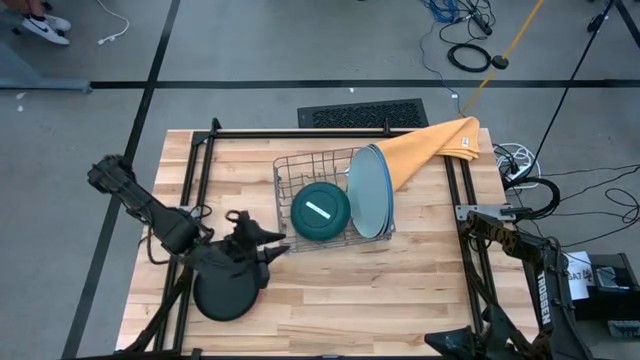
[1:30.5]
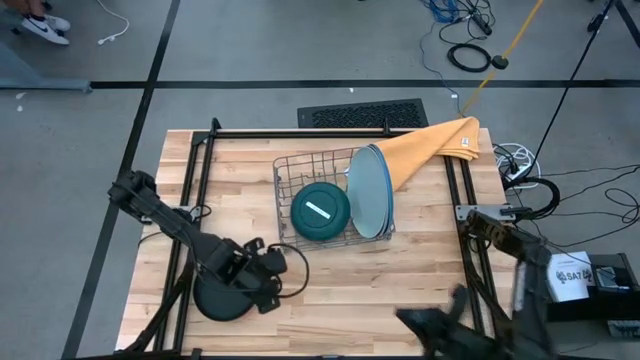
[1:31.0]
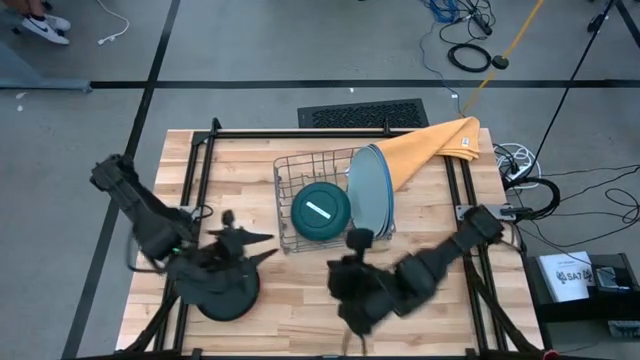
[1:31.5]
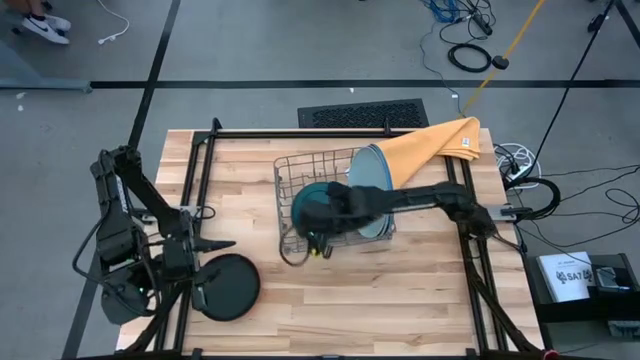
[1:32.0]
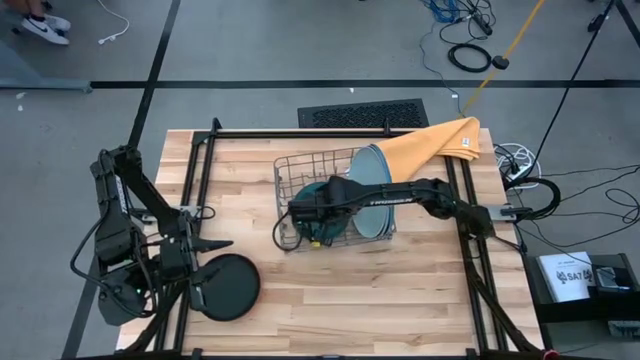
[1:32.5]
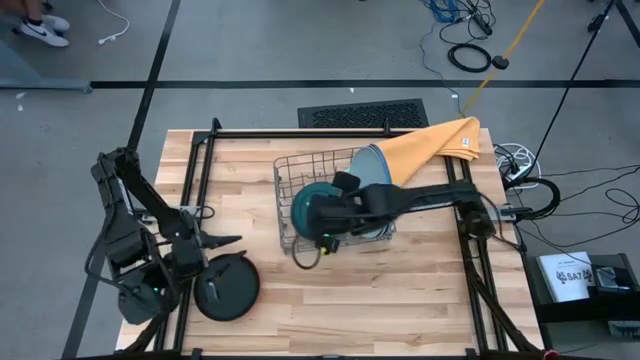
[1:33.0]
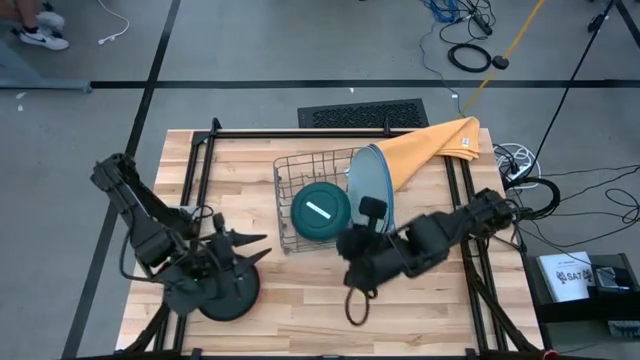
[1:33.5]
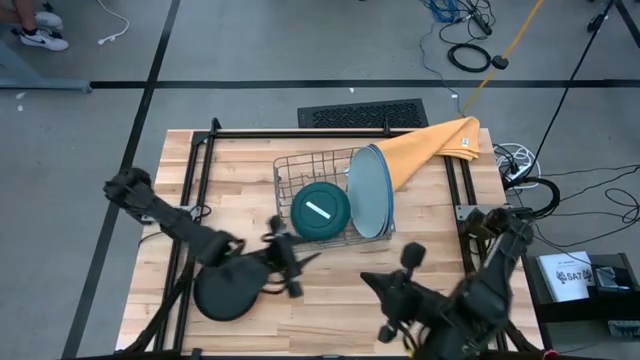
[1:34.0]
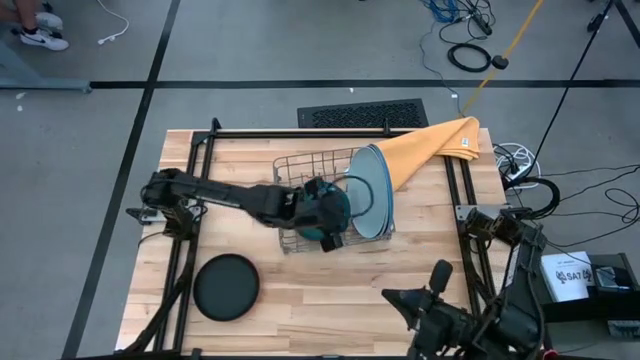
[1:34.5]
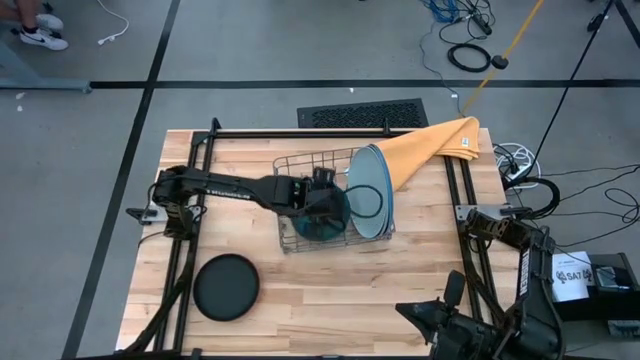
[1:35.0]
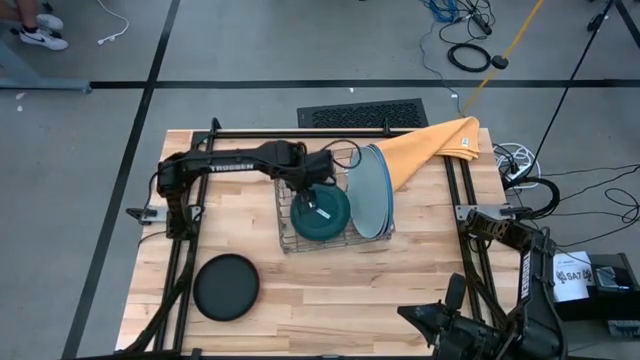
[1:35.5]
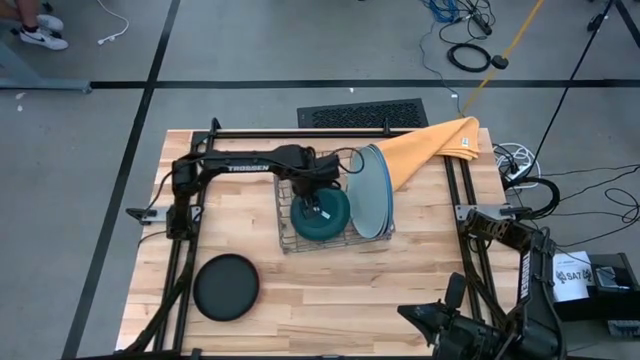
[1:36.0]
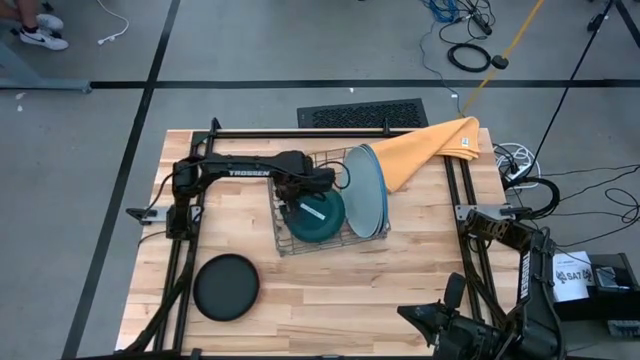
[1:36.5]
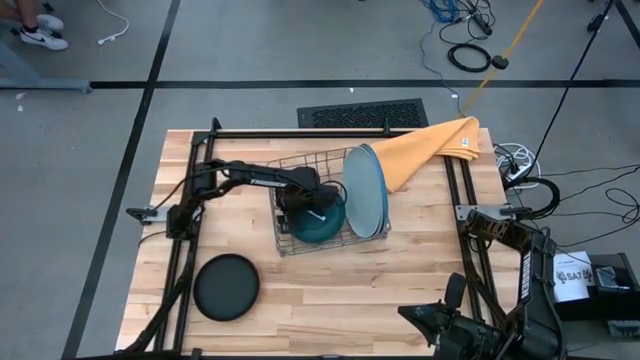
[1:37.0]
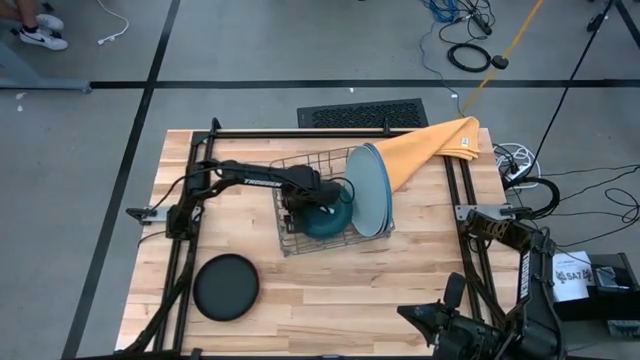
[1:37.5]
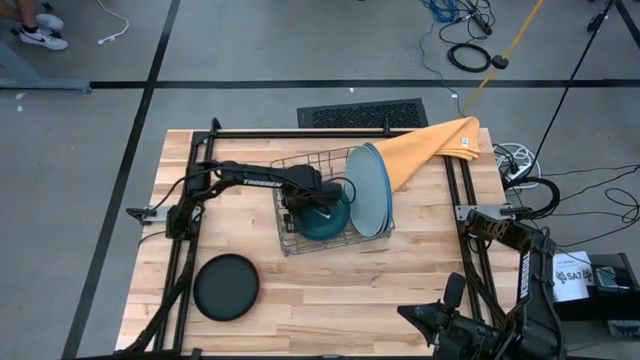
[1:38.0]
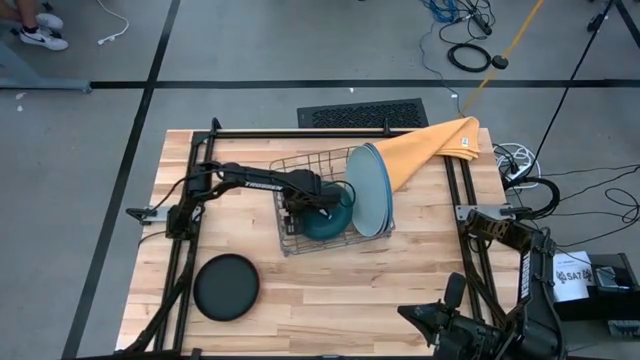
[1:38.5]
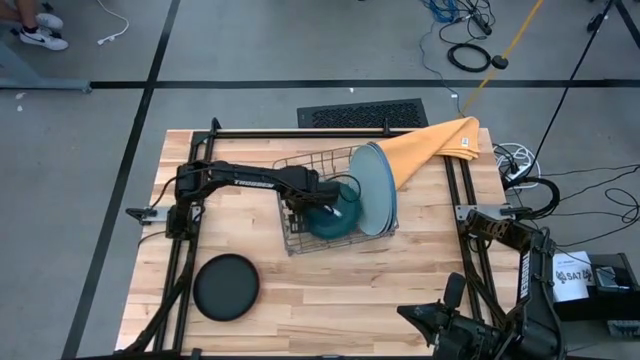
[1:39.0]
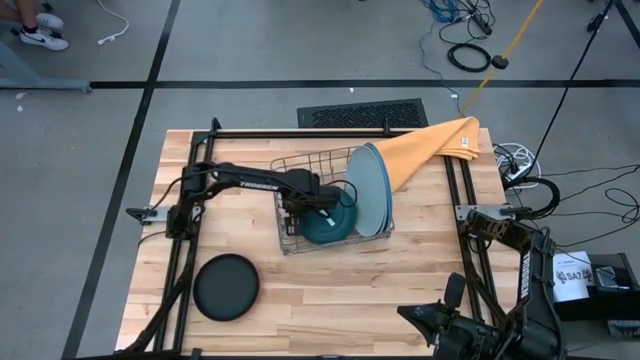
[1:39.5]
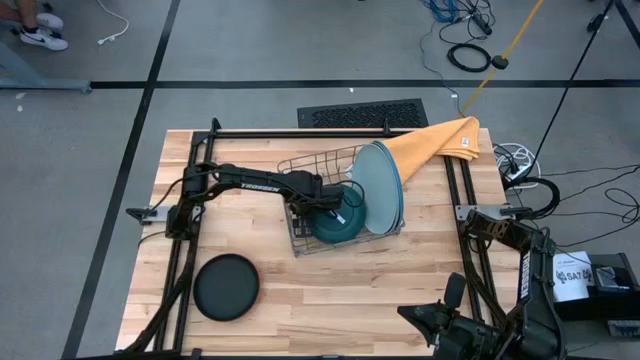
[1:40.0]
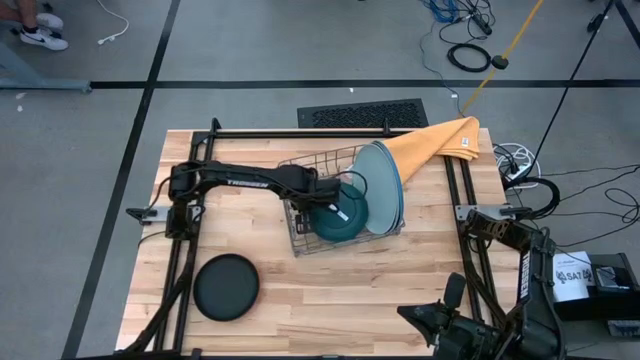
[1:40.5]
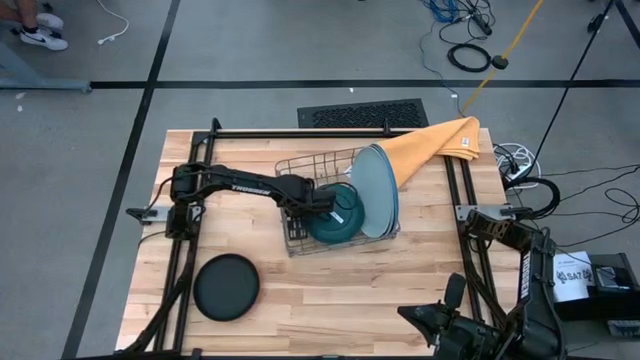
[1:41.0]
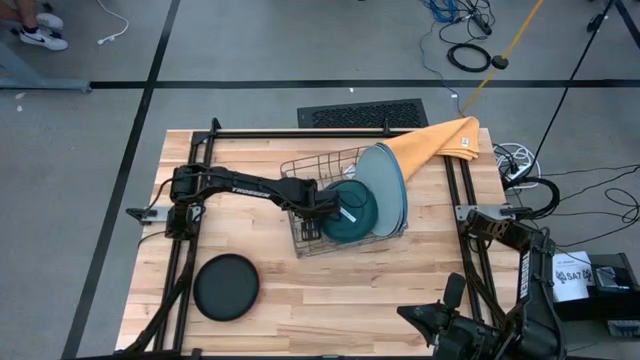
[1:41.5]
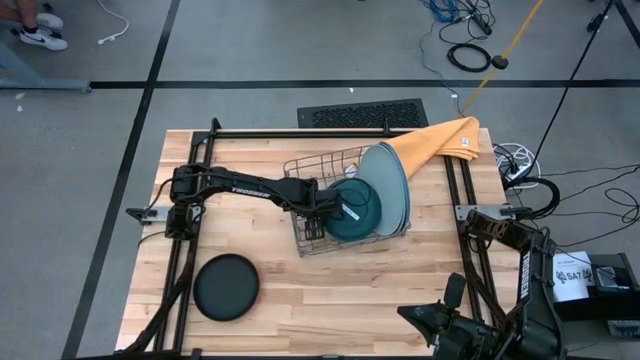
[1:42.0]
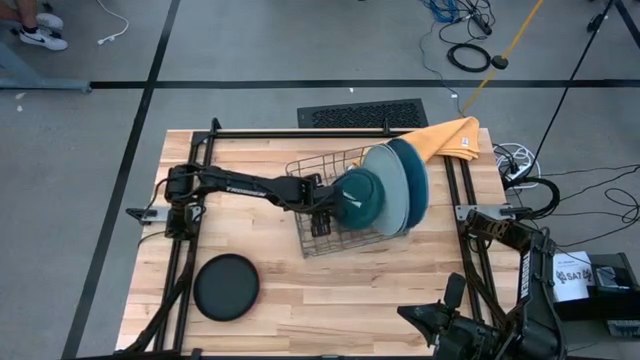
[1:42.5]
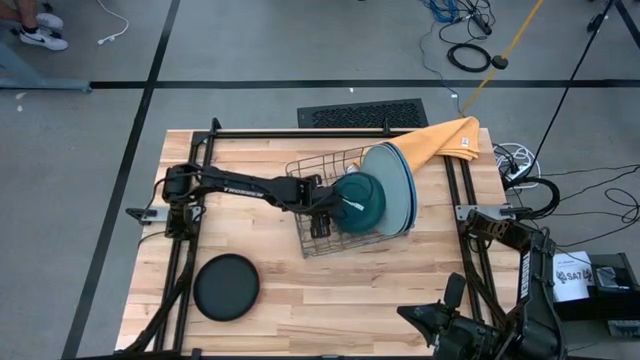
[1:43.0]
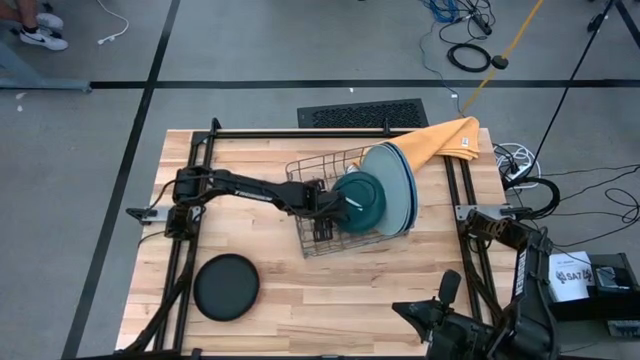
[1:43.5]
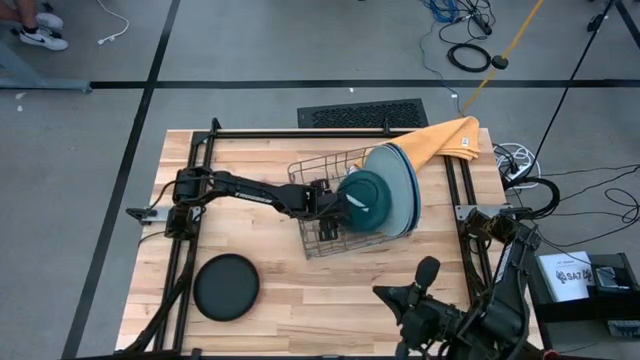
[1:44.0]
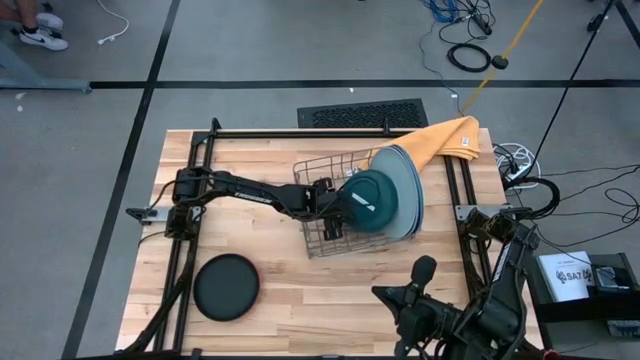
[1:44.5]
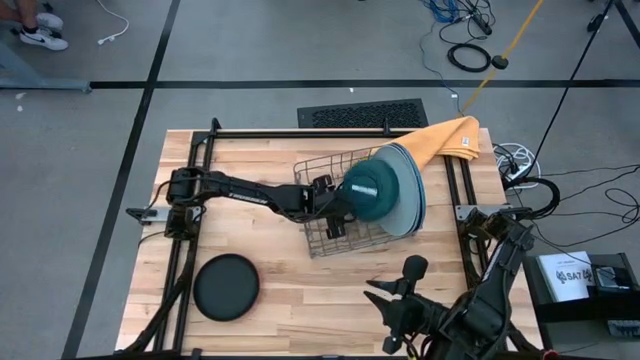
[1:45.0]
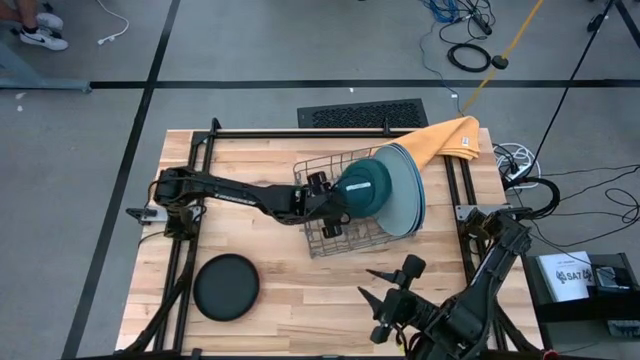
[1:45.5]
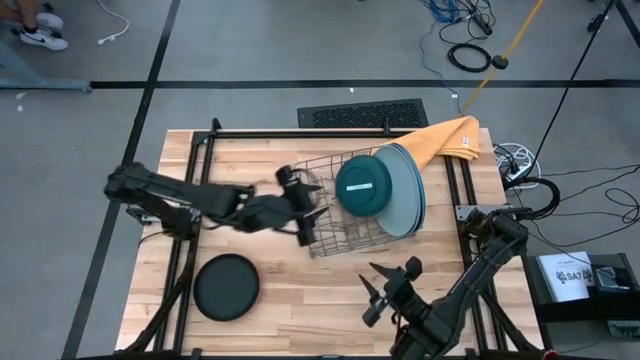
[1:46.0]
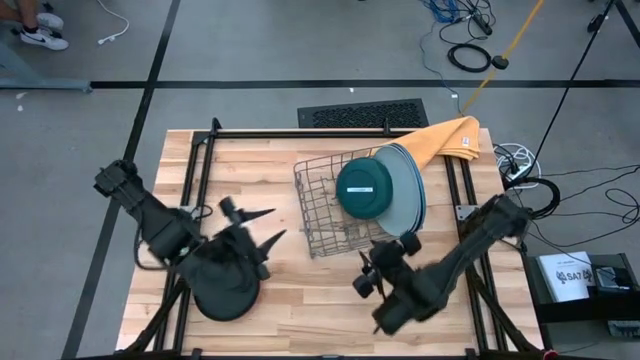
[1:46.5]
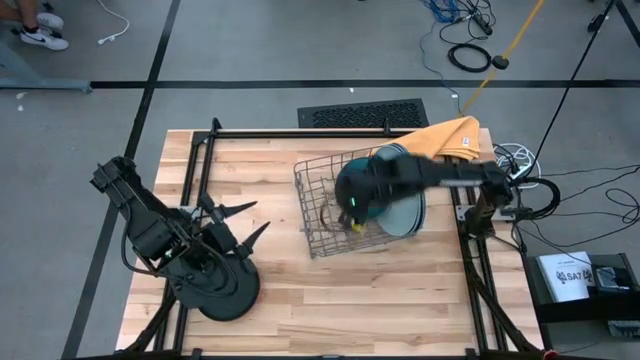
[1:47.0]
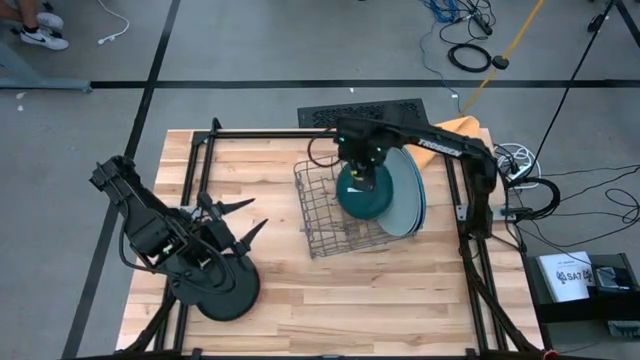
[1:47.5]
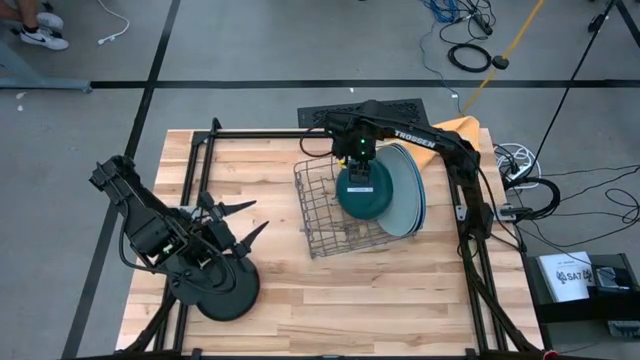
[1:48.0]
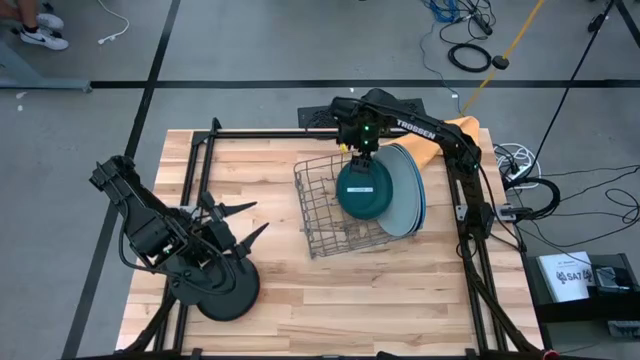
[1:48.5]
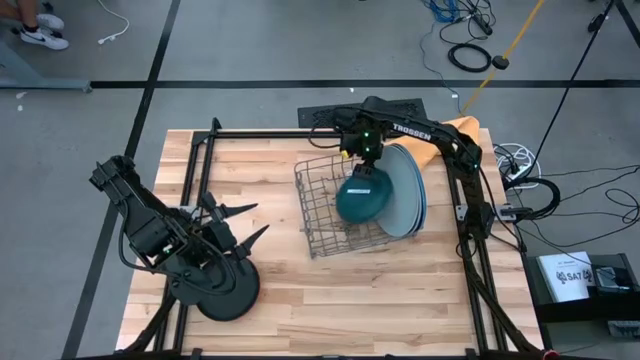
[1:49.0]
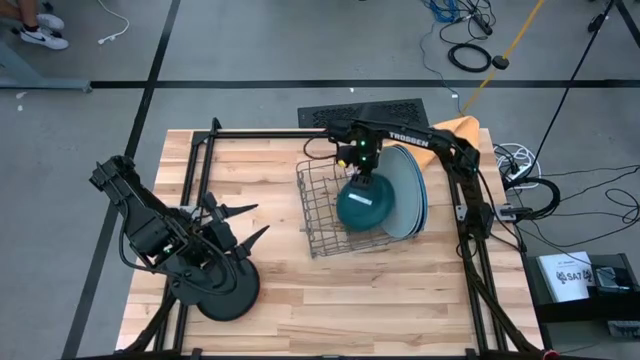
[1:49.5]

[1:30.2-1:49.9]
Task: Sort dishes
Put the dark green plate into the green dish rack

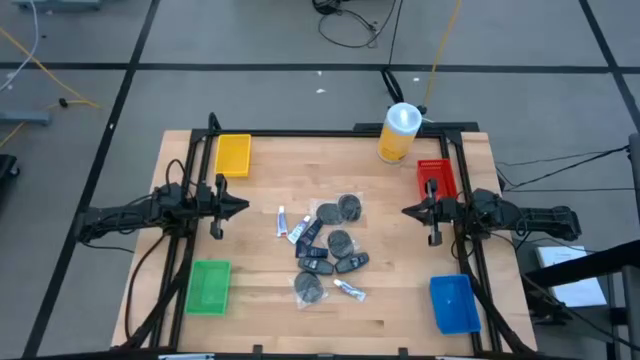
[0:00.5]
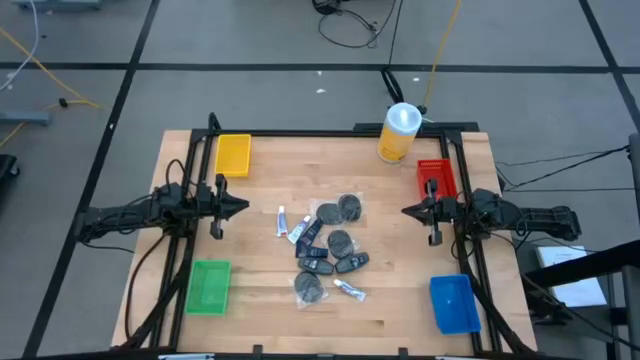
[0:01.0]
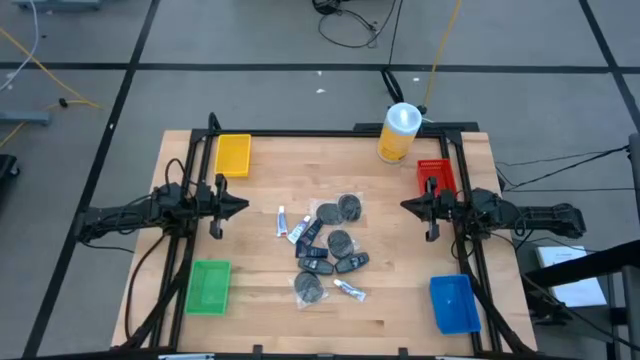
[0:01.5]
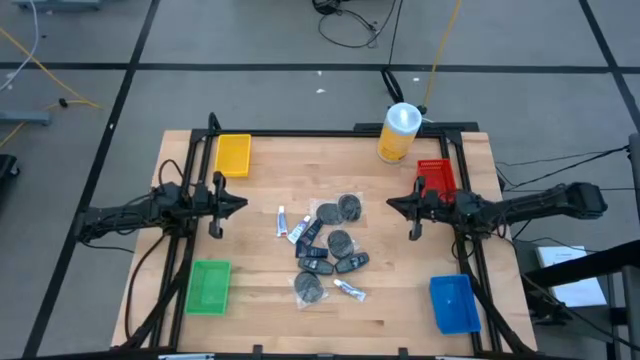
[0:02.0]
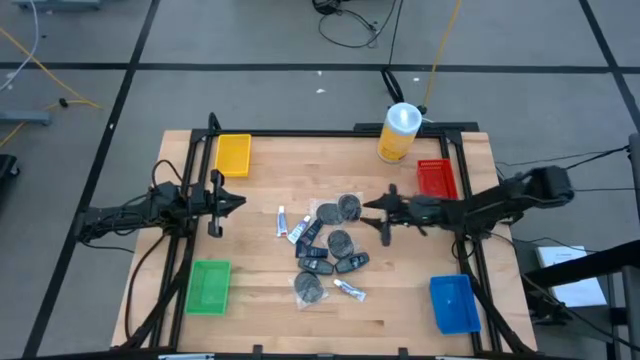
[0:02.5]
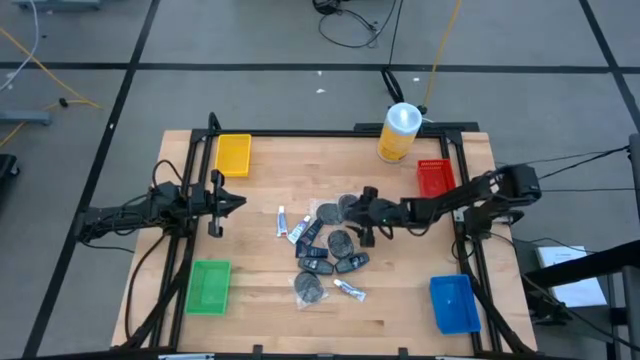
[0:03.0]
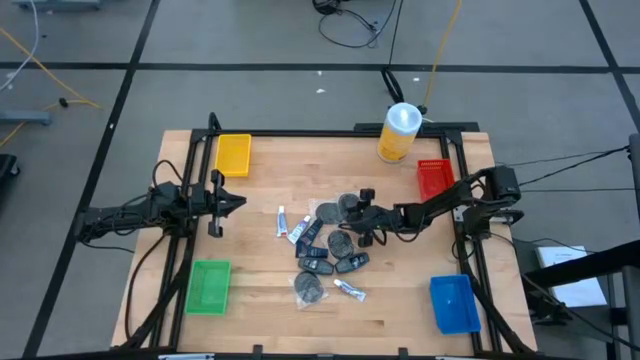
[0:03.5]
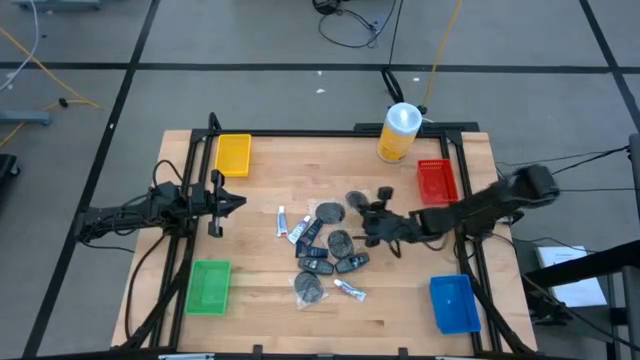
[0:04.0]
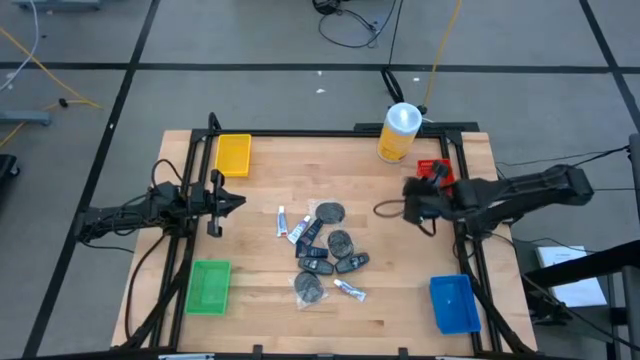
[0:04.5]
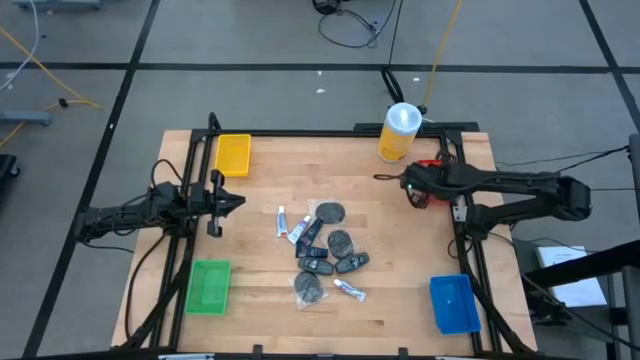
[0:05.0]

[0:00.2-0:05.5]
Task: Pick & Place Travel size toiletries
Put the black hairbrush into the red bin
